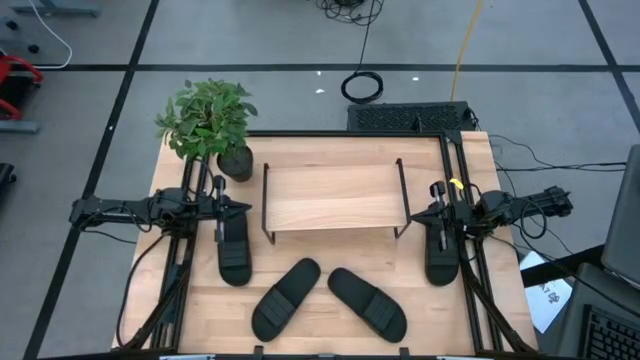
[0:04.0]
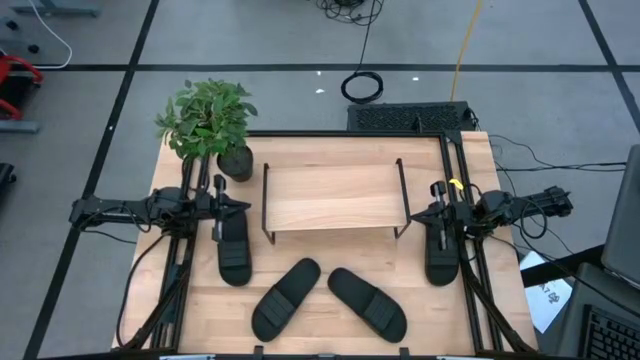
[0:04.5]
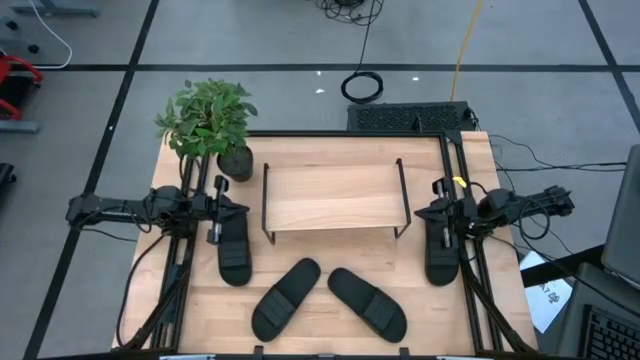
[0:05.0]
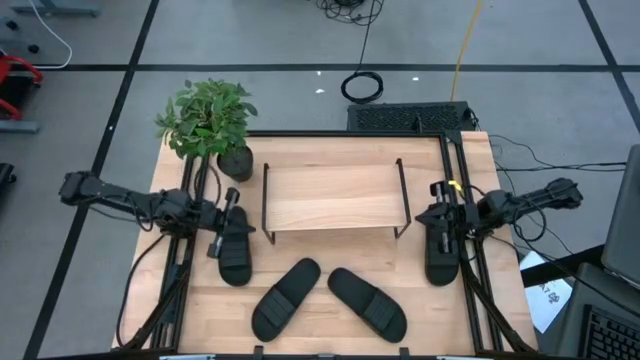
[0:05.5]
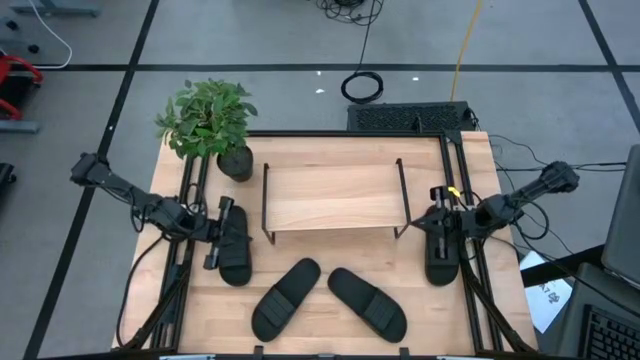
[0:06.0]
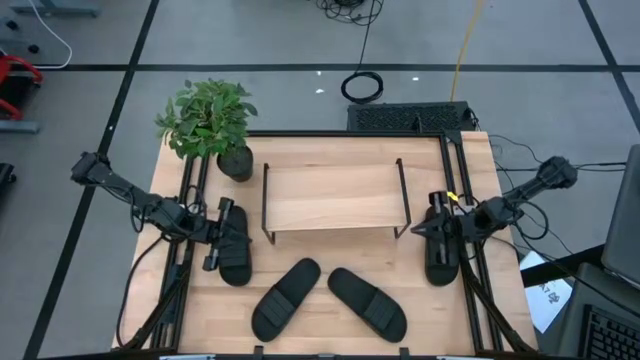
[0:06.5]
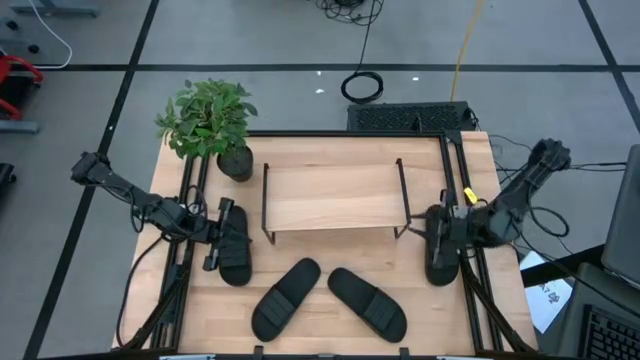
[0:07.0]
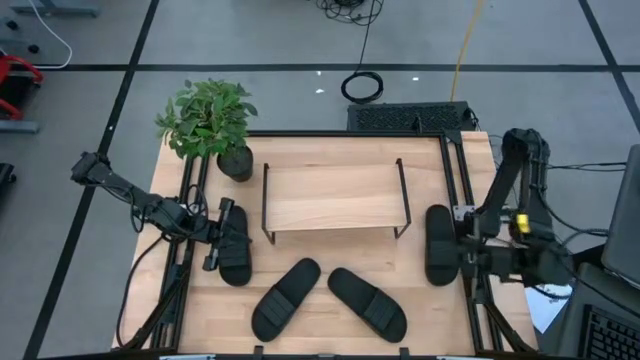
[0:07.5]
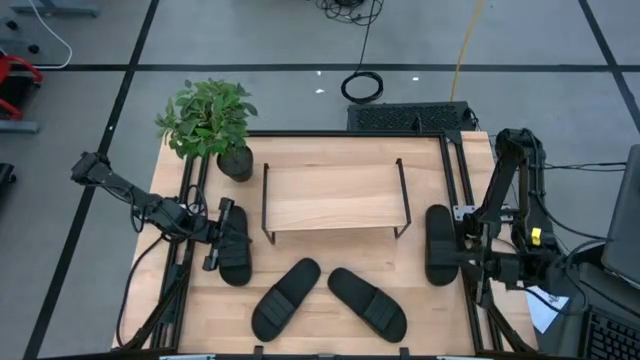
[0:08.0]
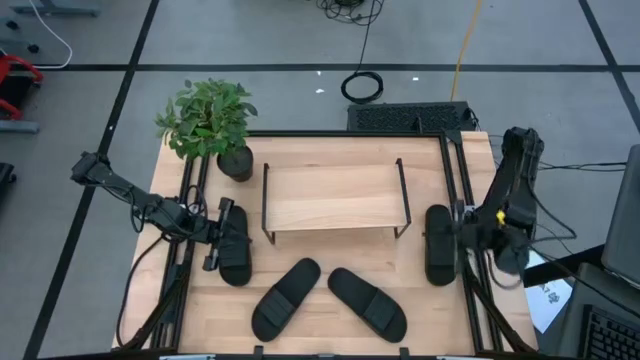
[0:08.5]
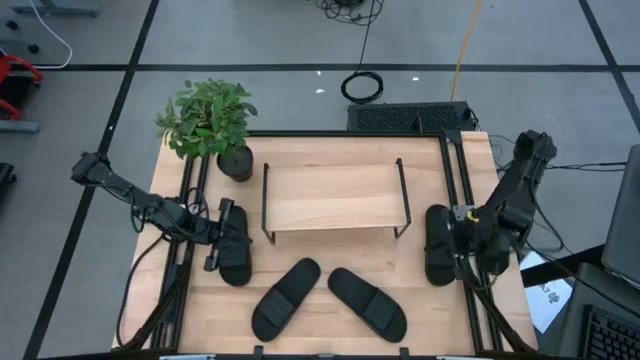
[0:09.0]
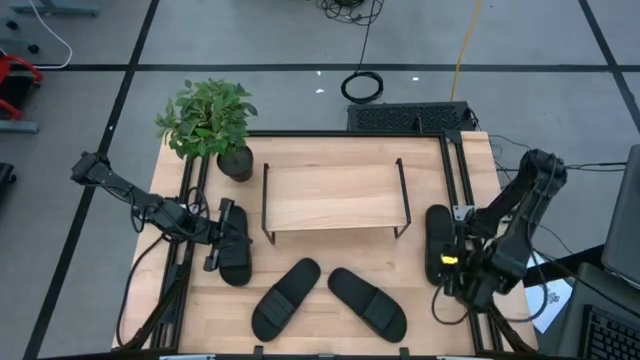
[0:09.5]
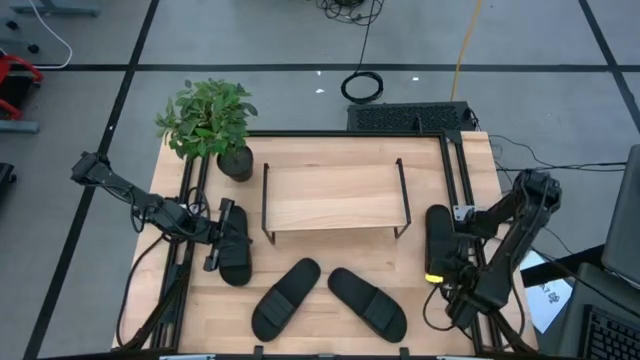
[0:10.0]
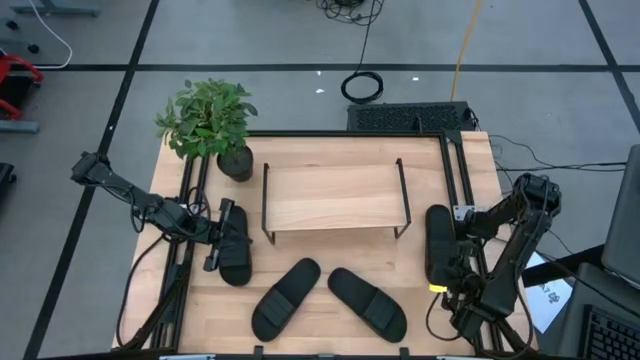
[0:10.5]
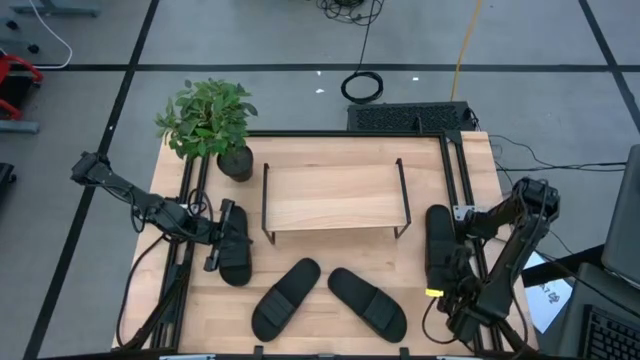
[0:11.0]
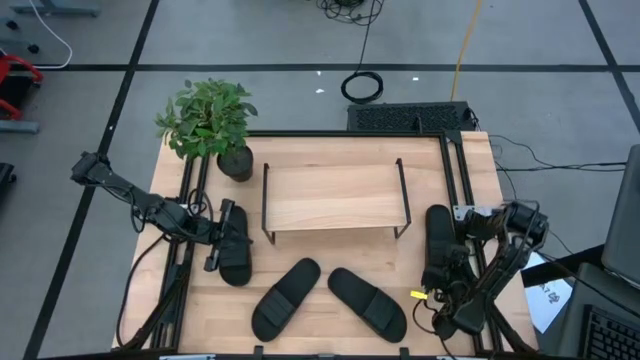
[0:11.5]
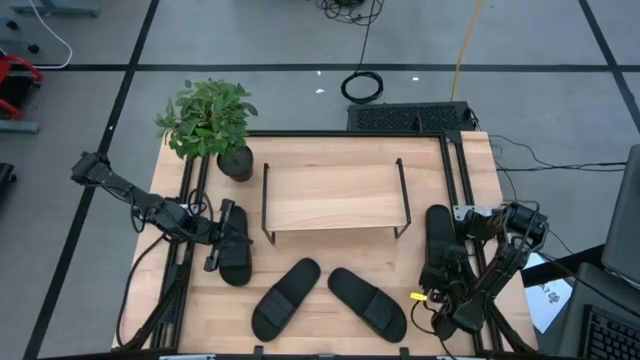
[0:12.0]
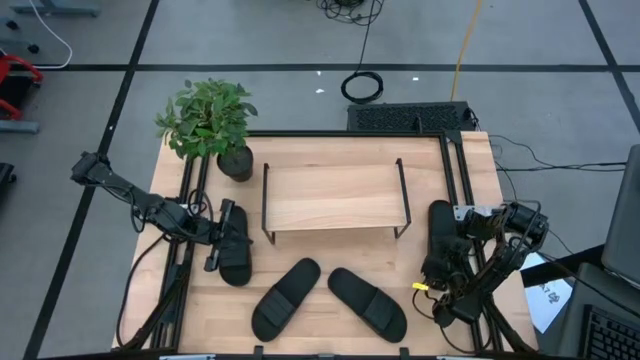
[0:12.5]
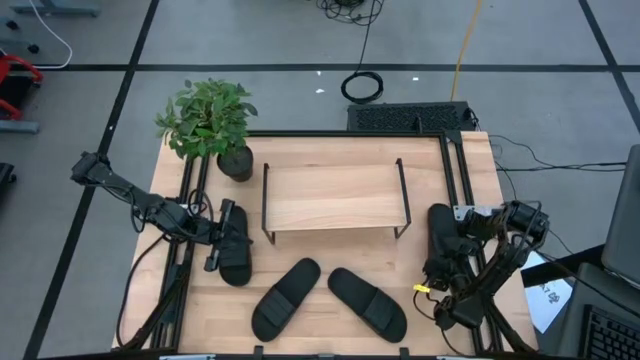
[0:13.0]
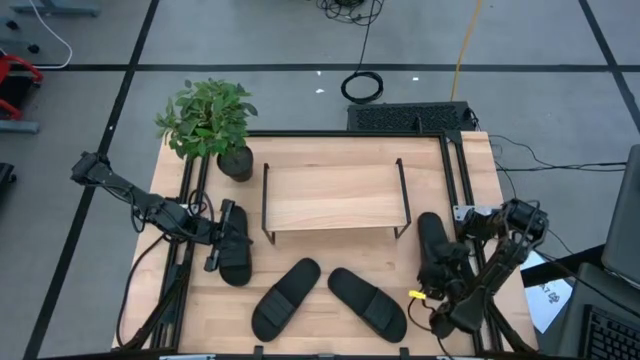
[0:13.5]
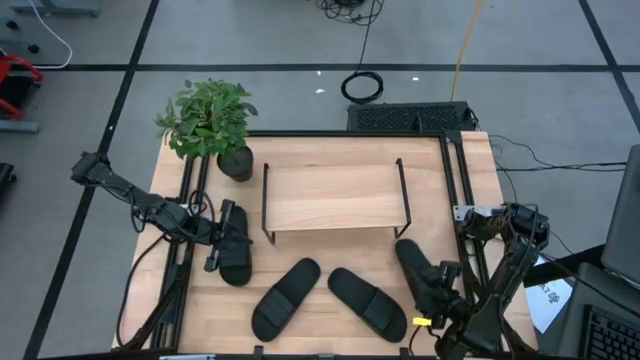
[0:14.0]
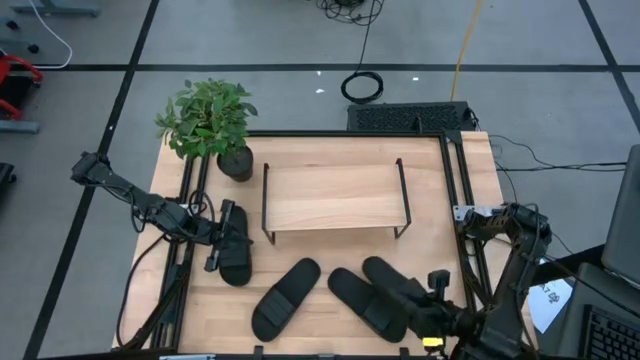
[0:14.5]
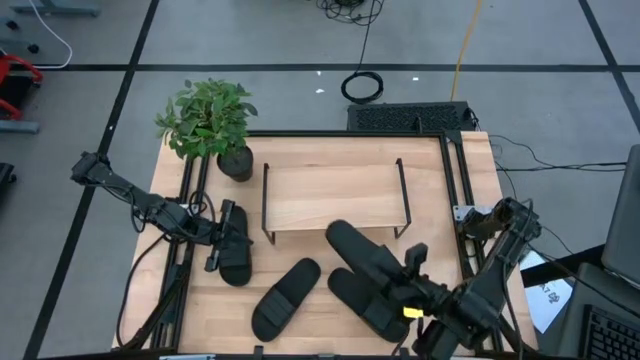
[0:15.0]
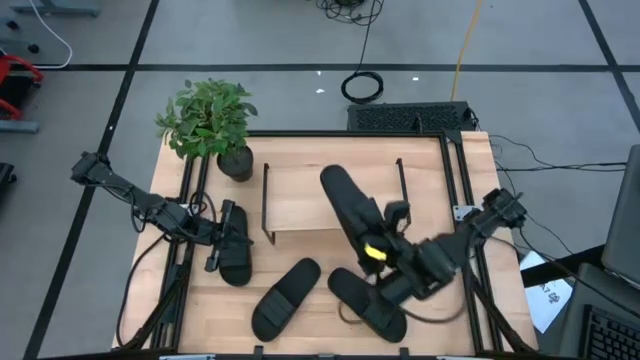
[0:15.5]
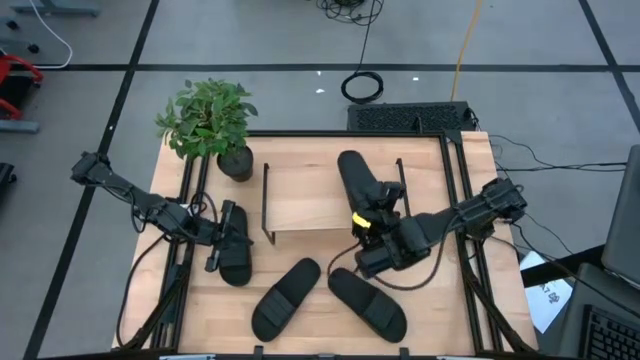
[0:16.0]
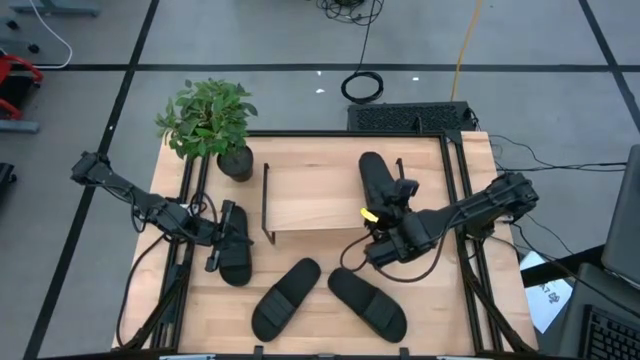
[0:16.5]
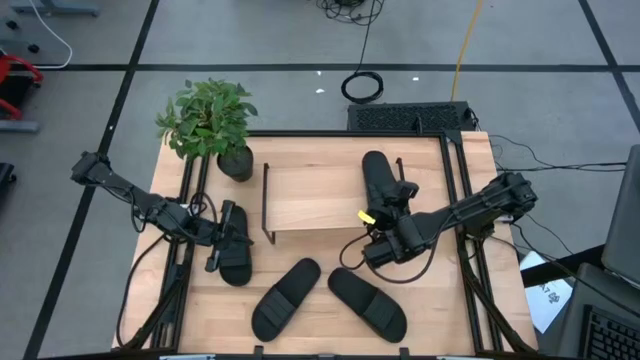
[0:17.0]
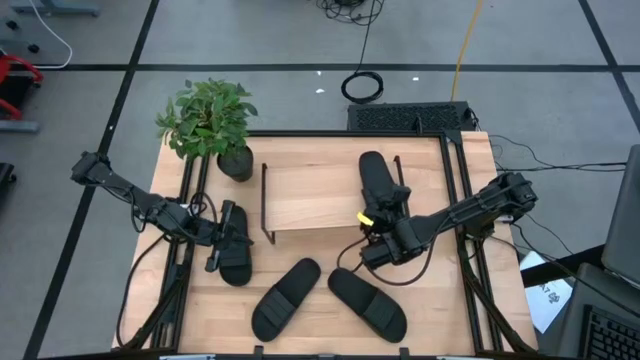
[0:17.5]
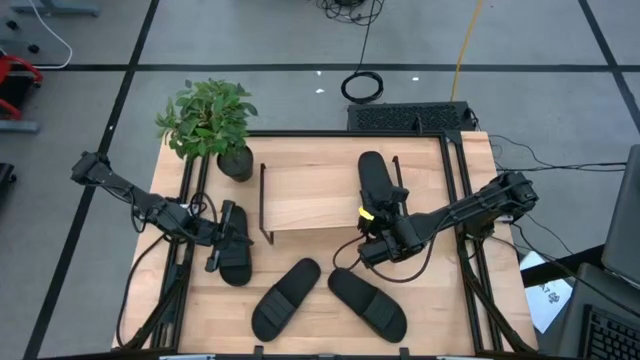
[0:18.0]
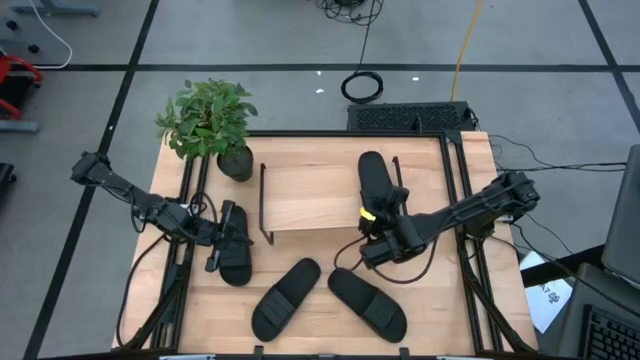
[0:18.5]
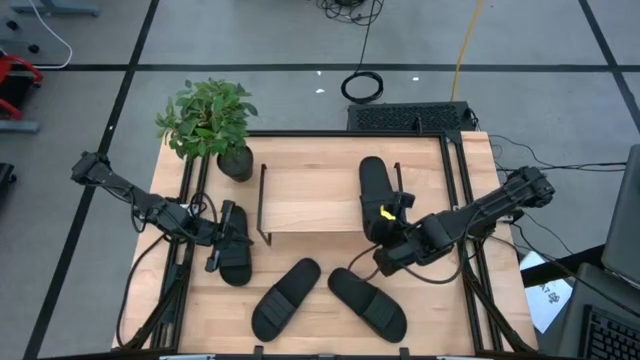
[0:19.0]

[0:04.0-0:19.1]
Task: Pick and place slides into the shelf
Put the black slipper on the shelf

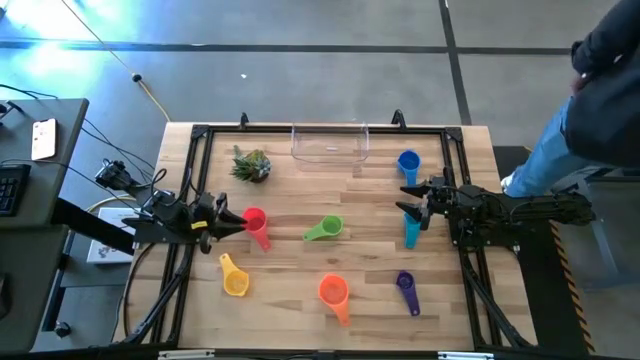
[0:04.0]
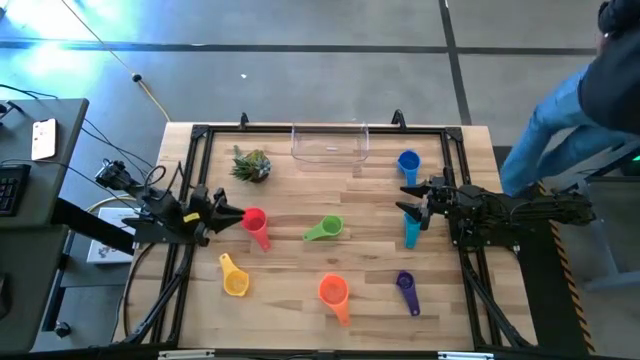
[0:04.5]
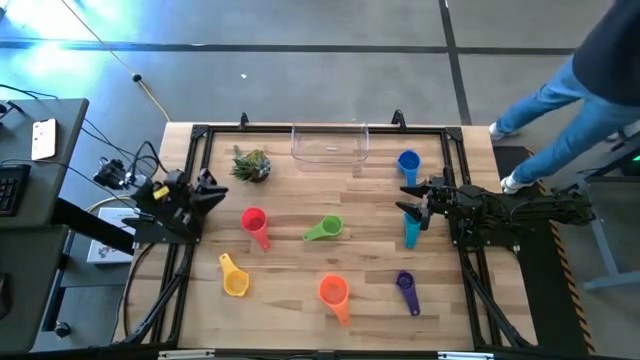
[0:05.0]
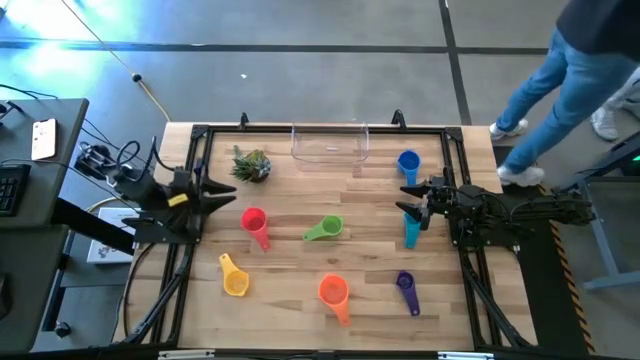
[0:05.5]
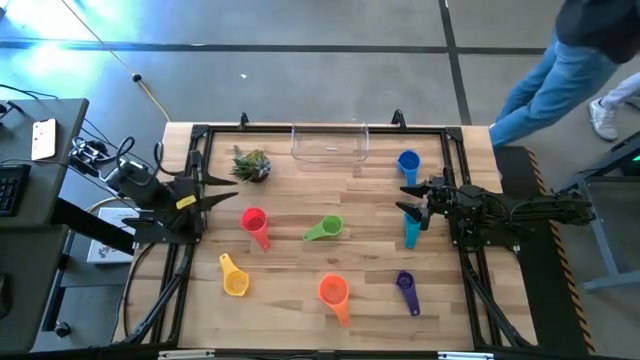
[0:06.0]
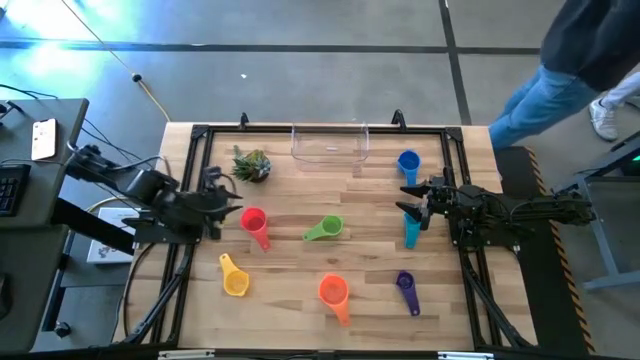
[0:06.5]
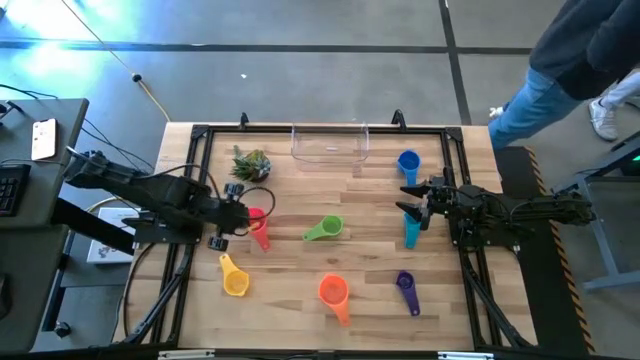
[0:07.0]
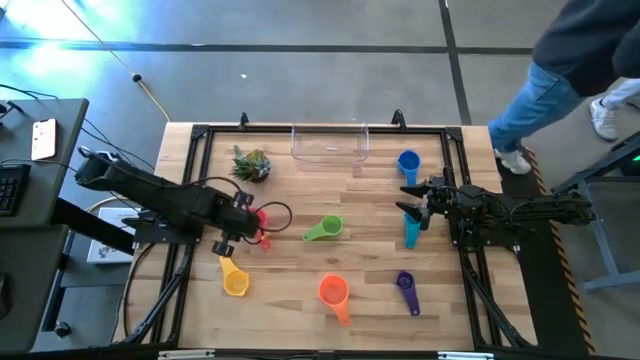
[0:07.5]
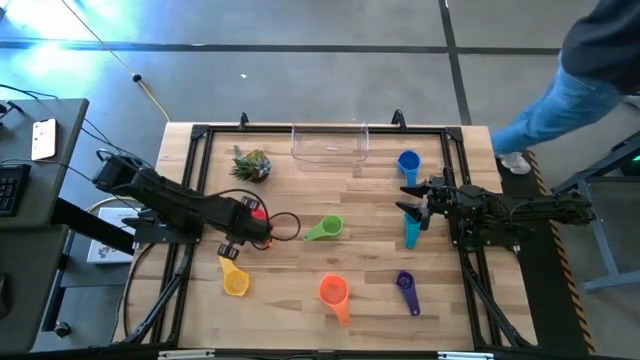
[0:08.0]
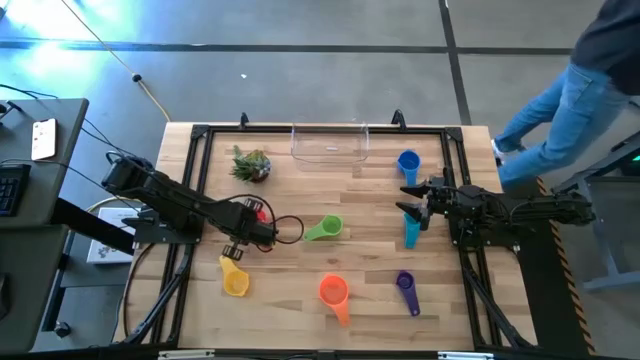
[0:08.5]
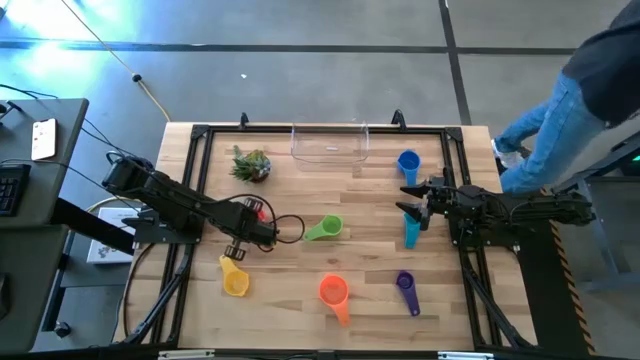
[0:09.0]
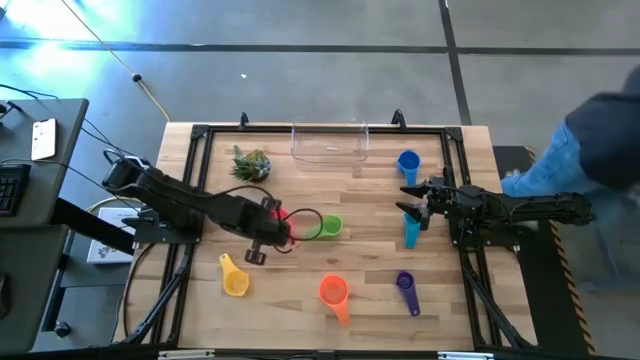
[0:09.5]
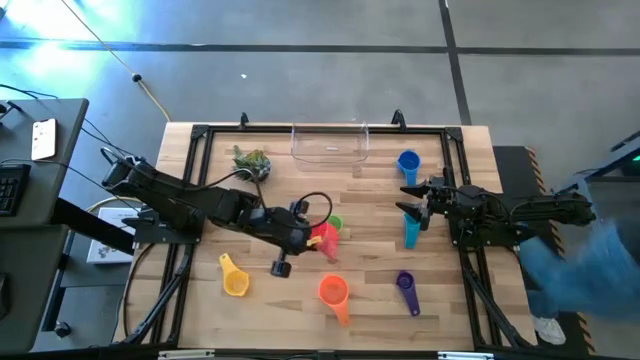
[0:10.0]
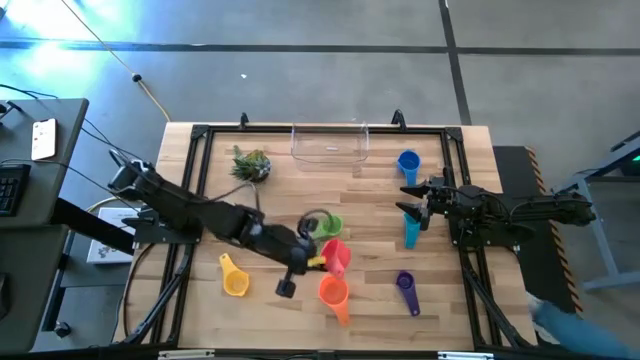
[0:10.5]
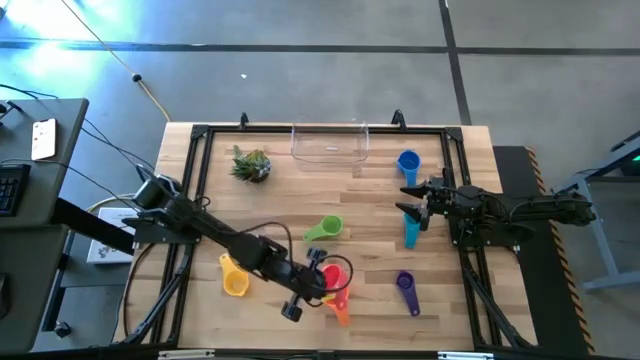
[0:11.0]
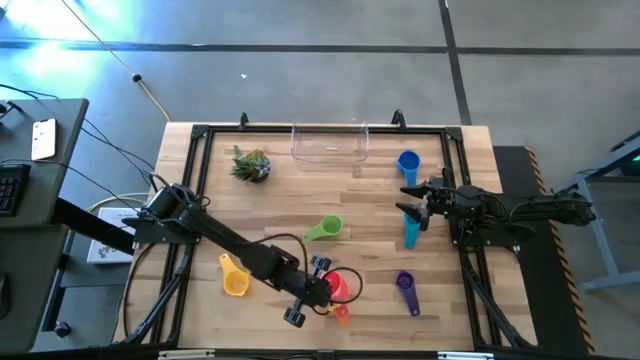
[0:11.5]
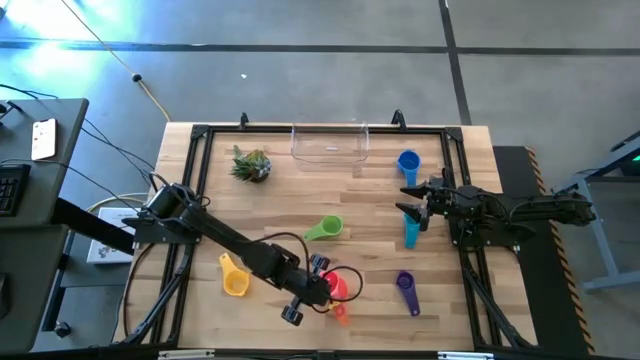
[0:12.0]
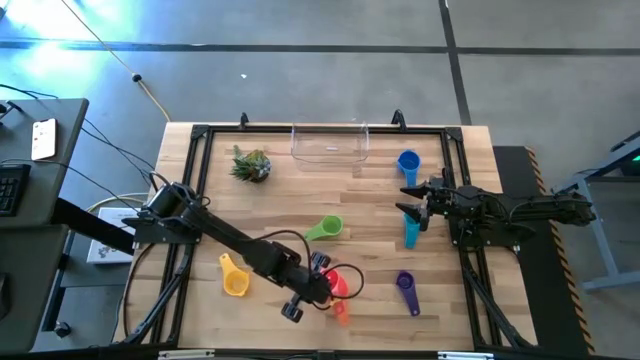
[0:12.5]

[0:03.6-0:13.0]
Task: Nest measuring cups in basket
Stack red measuring cup into the orange measuring cup
